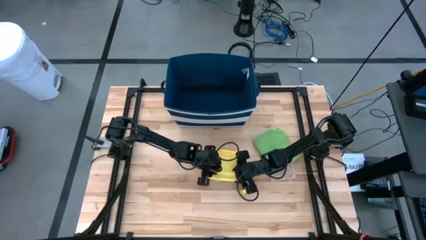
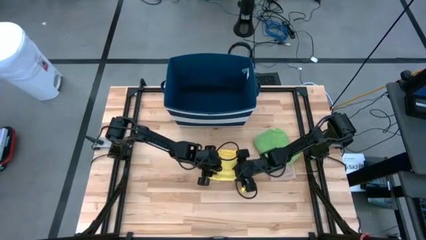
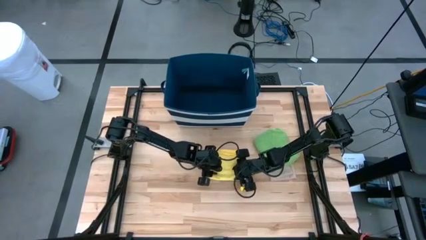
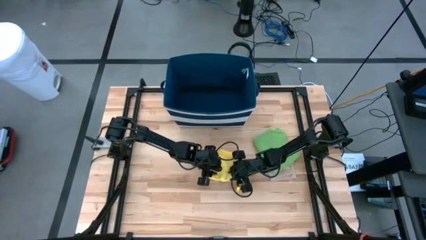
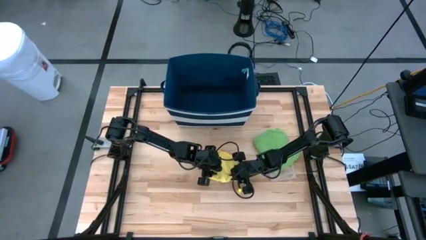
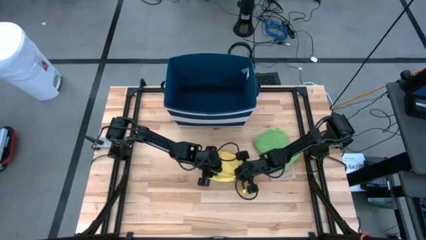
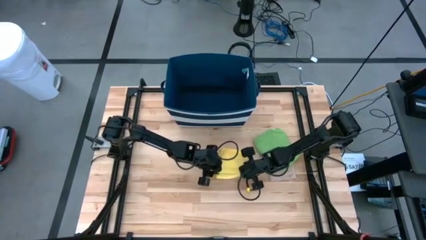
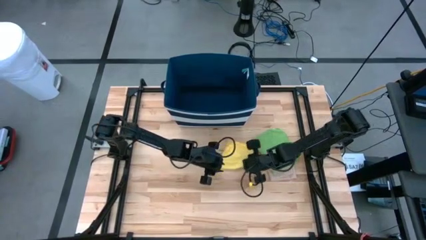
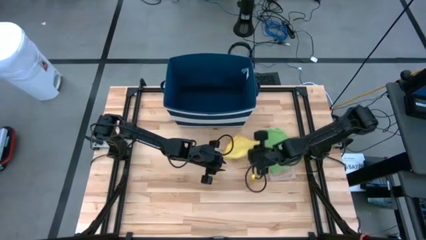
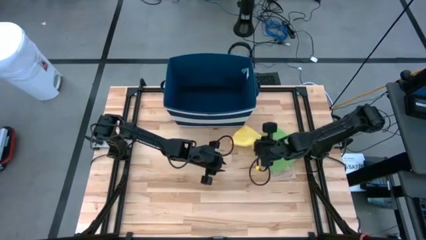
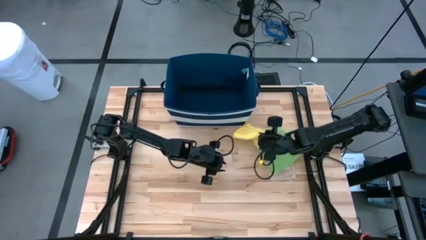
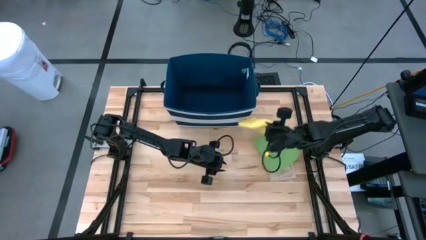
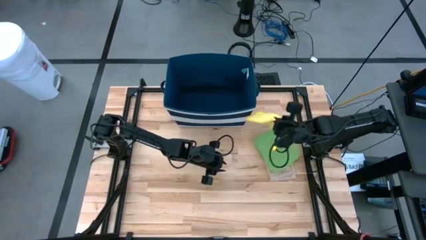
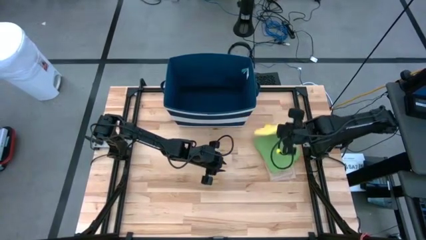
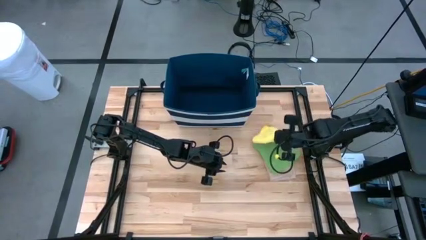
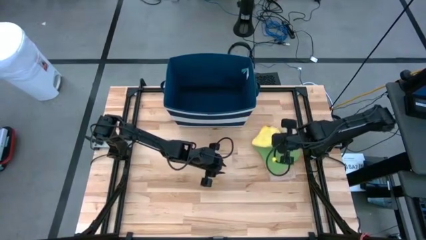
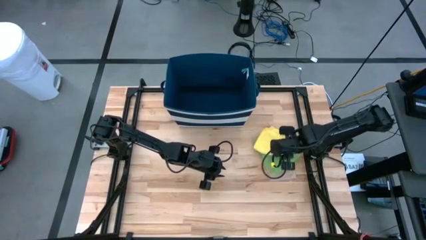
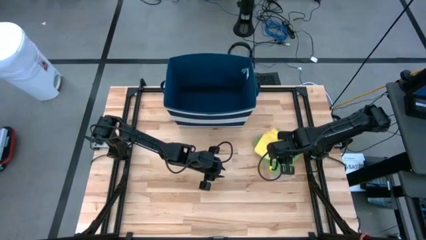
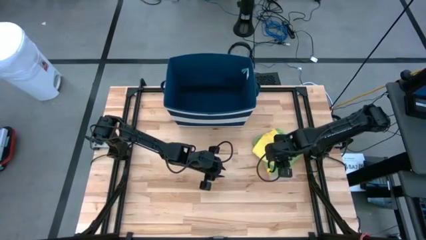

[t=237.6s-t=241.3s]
Task: Fold towel
Stack the yellow towel on the green towel

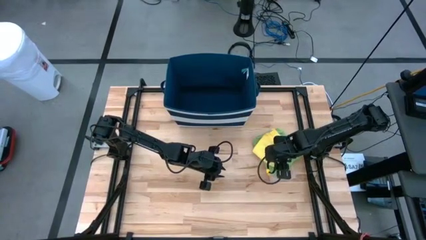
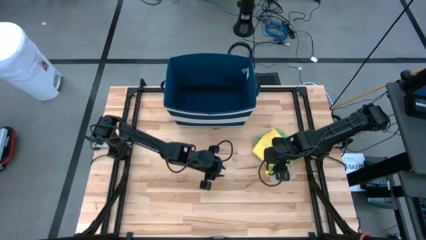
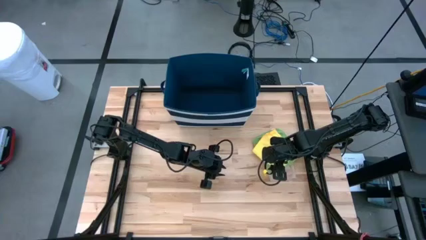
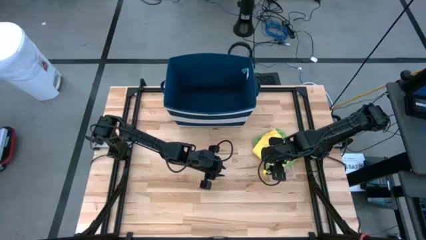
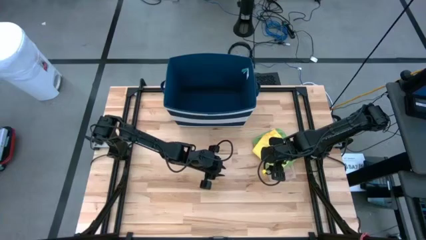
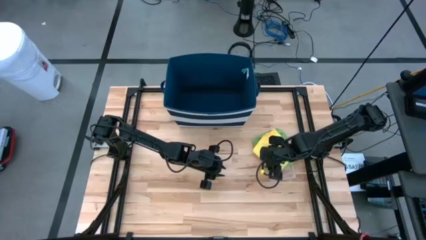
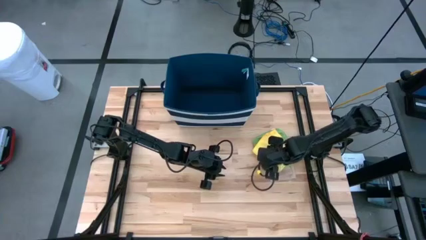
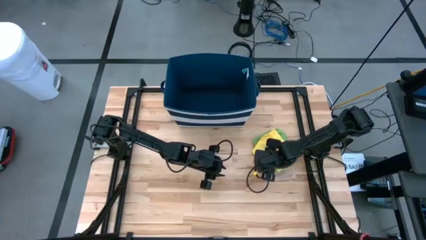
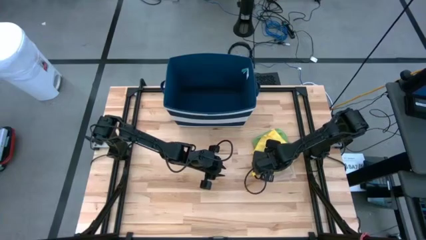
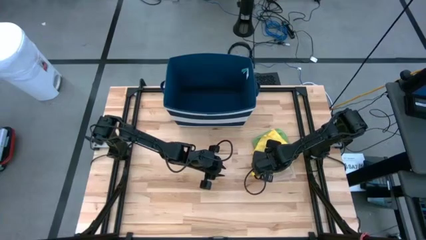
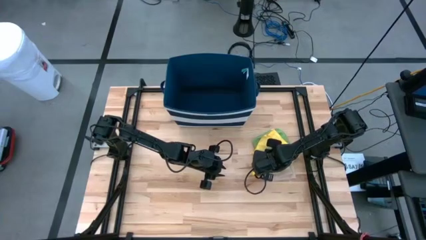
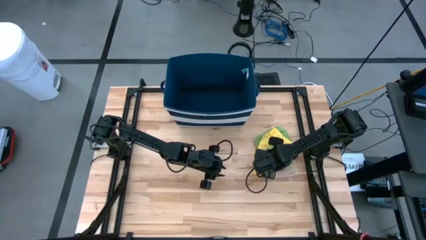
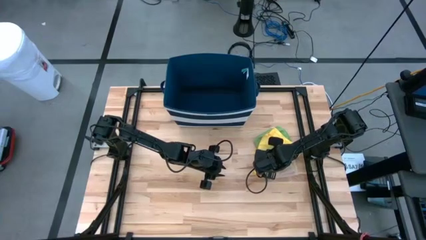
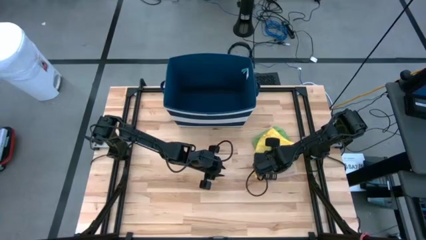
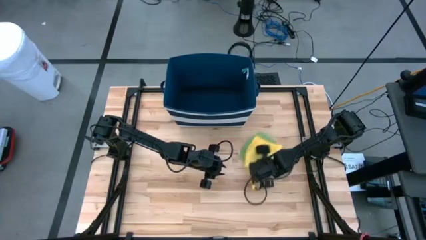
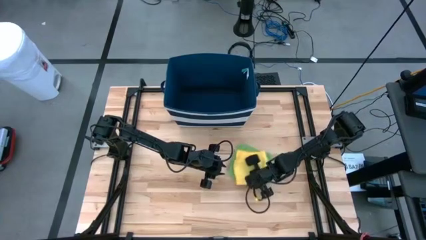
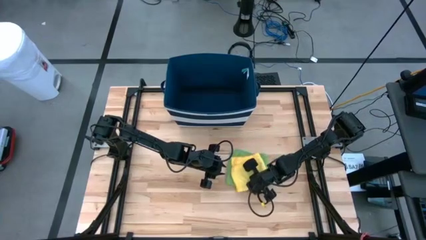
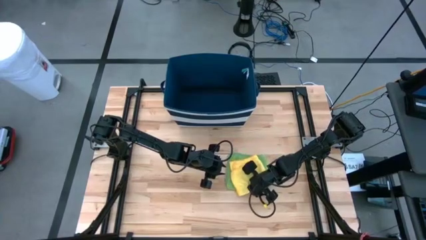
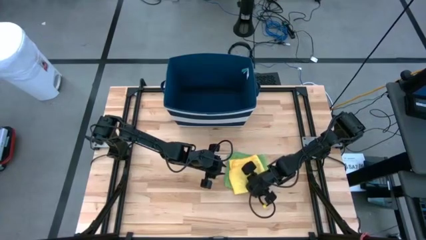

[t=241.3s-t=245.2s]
Move the stacked towels to the center

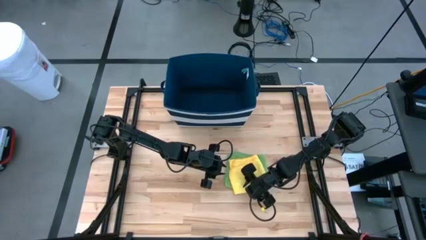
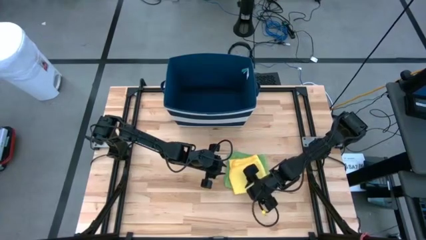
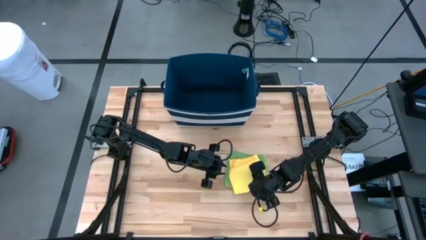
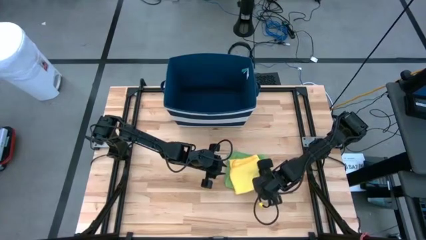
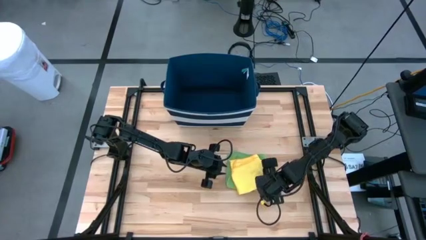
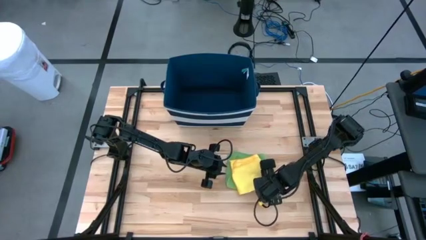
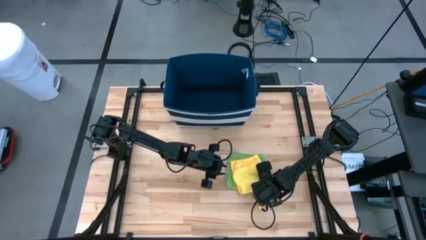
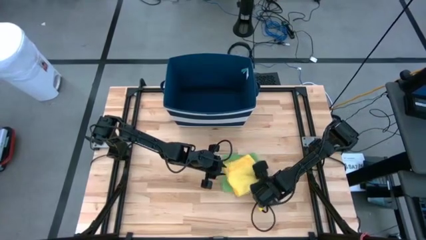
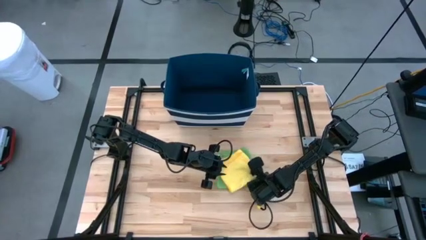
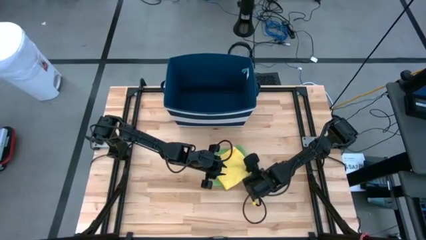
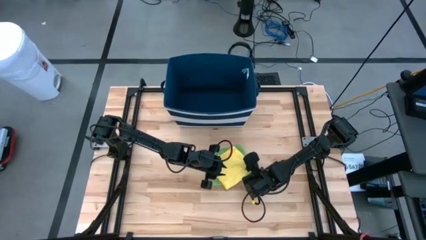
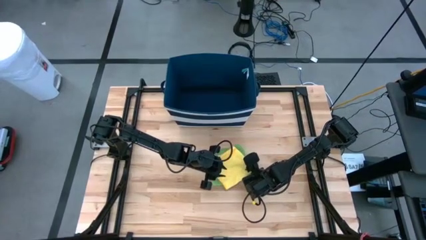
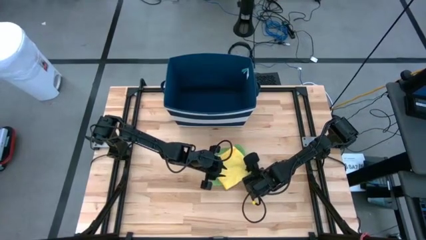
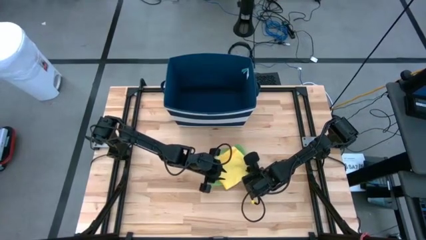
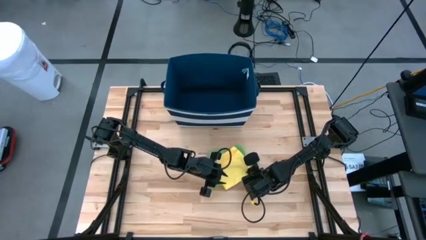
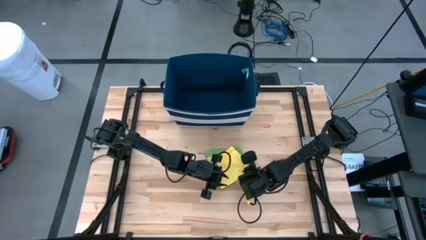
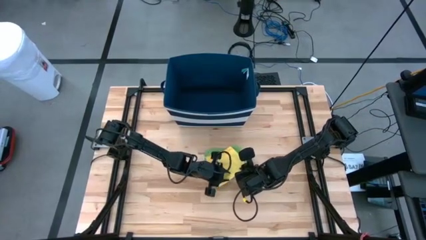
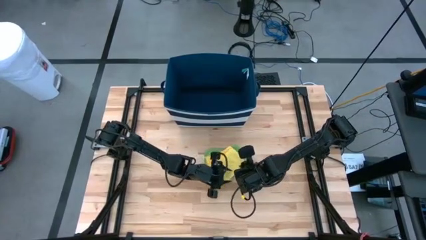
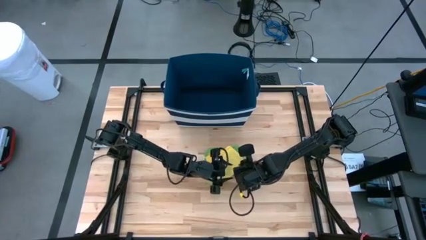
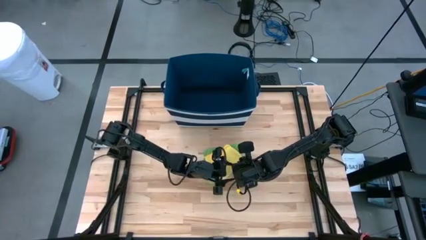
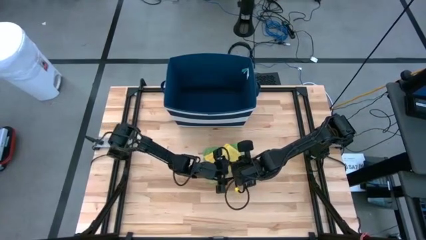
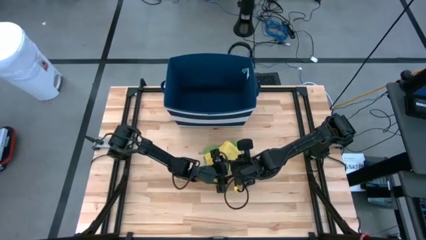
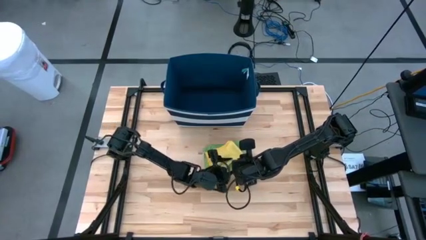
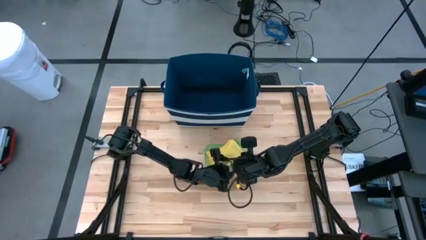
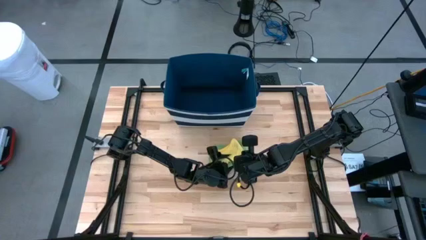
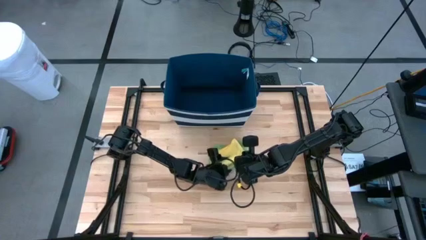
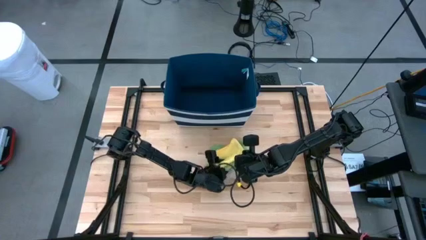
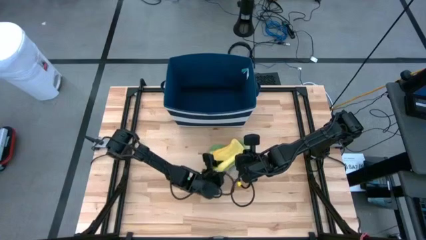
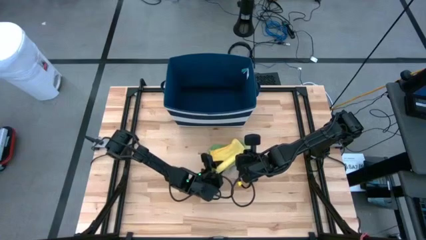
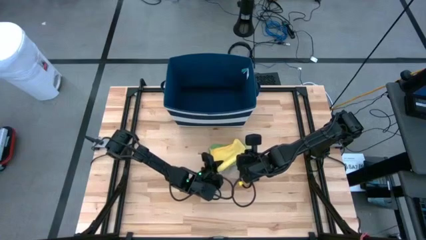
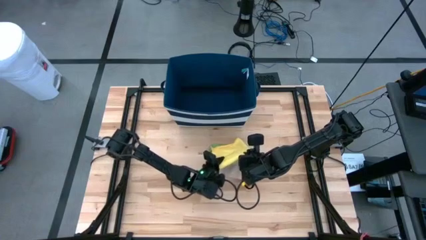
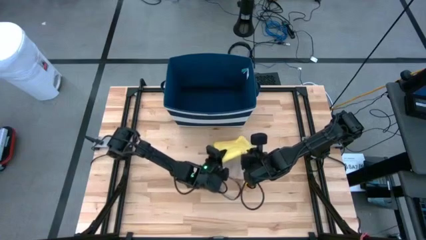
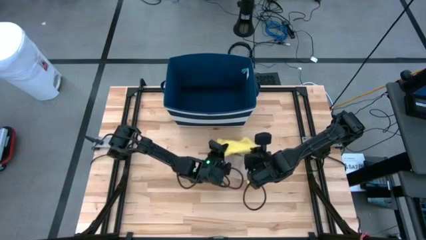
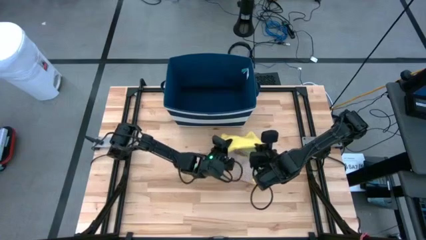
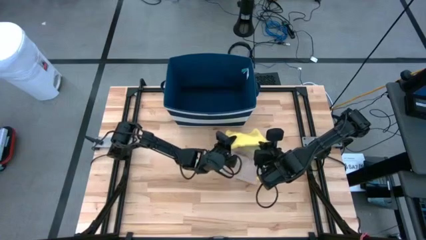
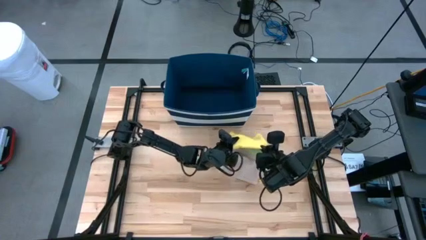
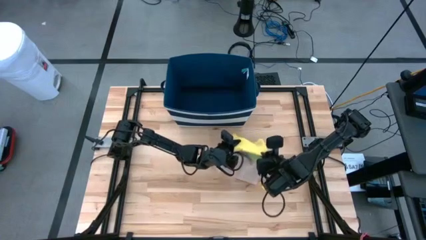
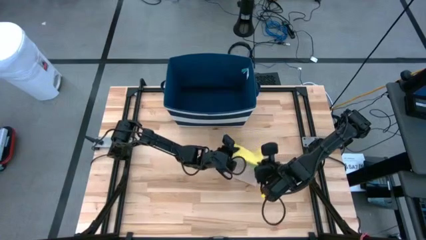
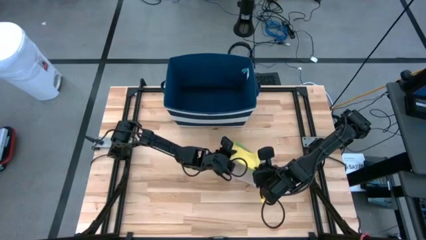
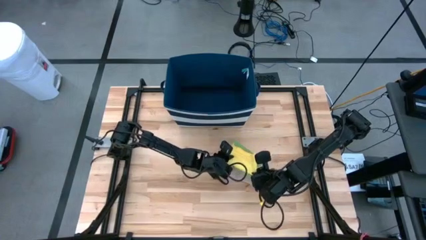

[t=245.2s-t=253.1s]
Put the stacked towels into the blue bin
